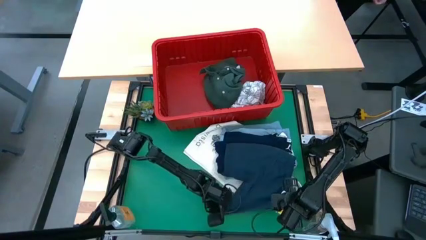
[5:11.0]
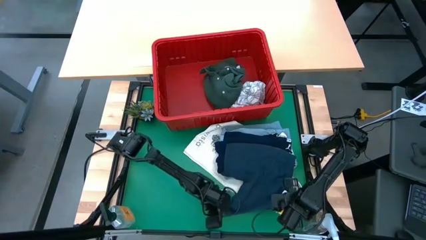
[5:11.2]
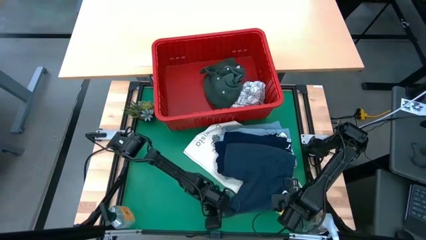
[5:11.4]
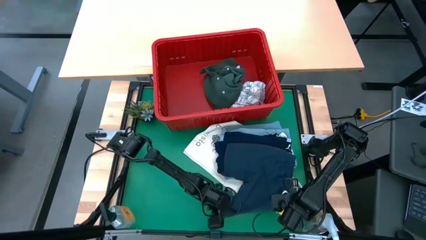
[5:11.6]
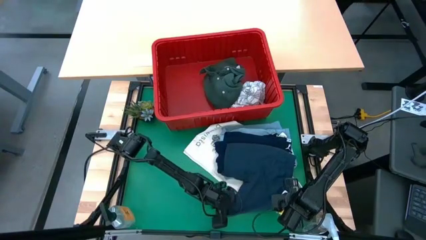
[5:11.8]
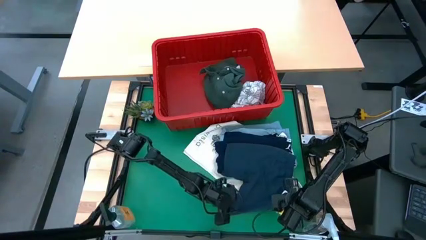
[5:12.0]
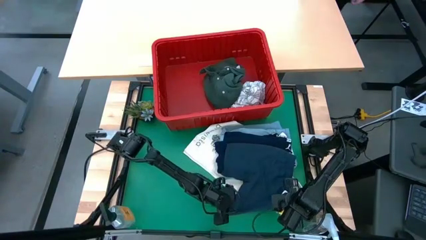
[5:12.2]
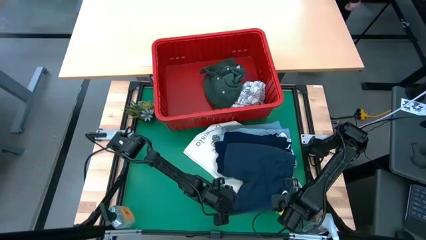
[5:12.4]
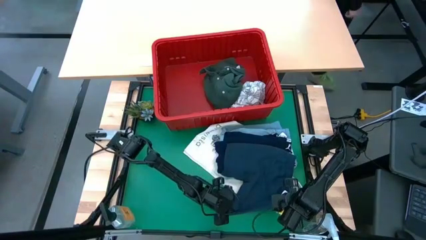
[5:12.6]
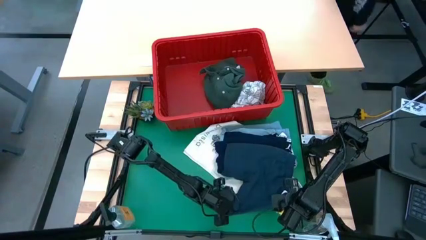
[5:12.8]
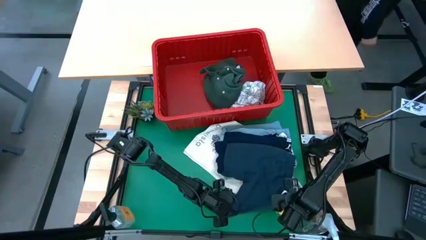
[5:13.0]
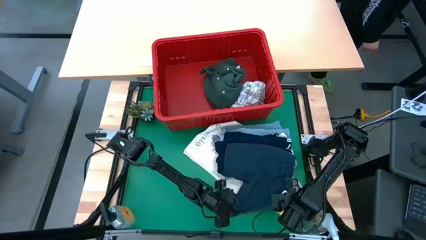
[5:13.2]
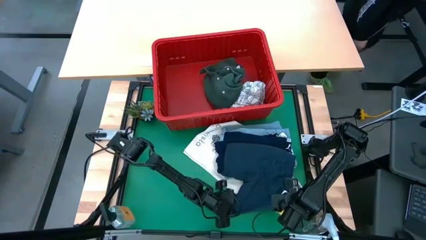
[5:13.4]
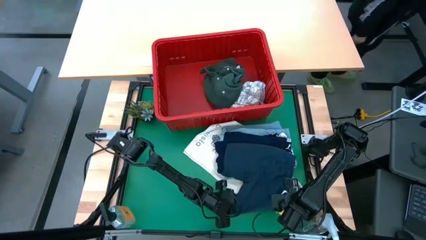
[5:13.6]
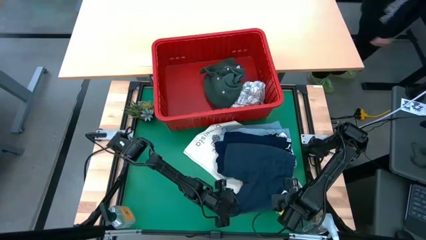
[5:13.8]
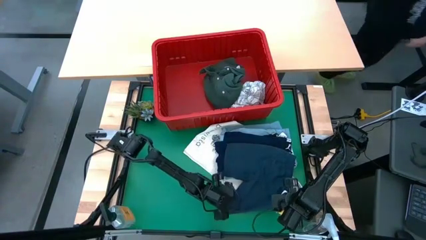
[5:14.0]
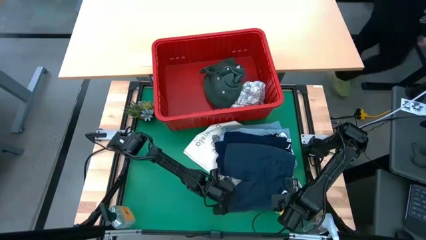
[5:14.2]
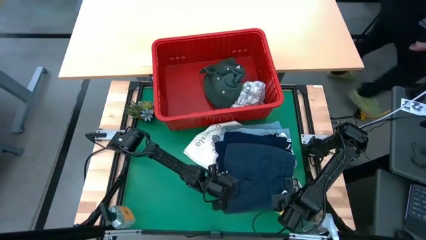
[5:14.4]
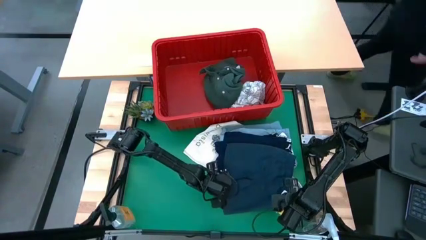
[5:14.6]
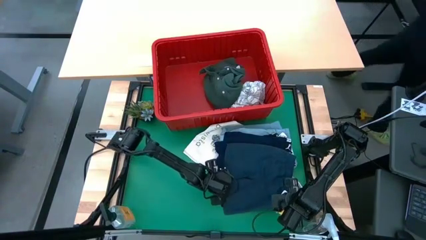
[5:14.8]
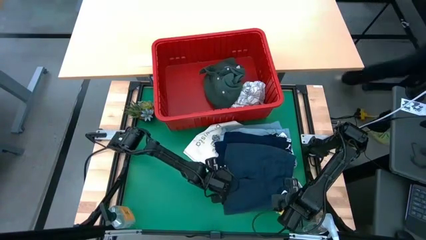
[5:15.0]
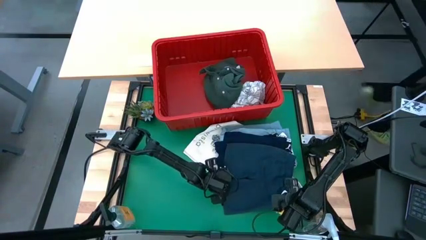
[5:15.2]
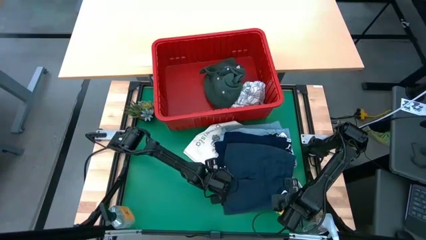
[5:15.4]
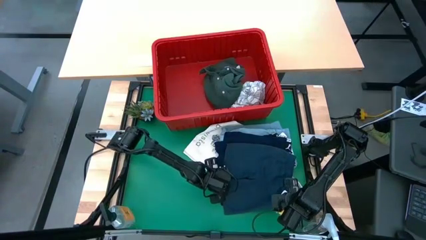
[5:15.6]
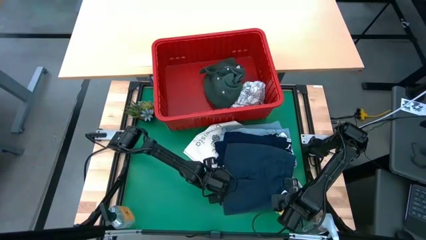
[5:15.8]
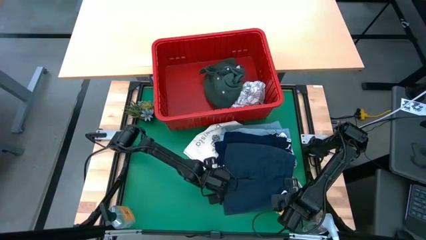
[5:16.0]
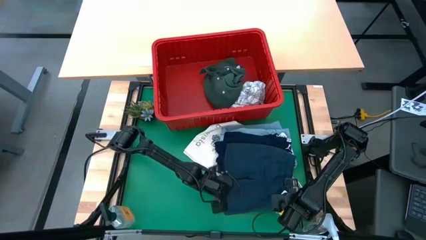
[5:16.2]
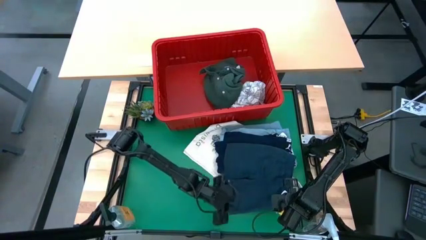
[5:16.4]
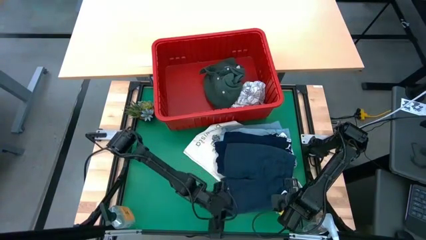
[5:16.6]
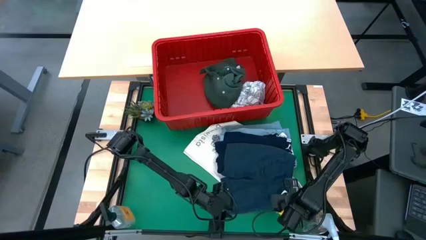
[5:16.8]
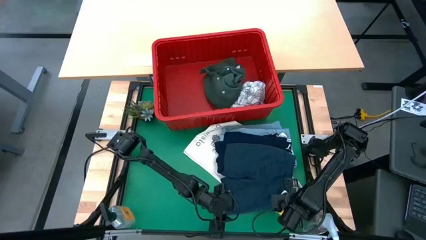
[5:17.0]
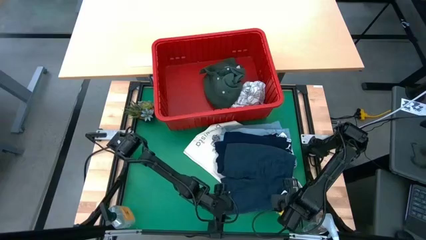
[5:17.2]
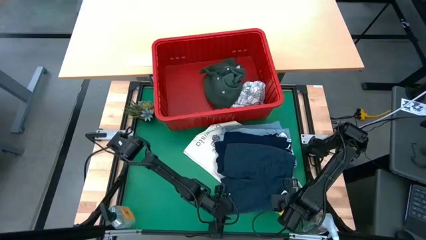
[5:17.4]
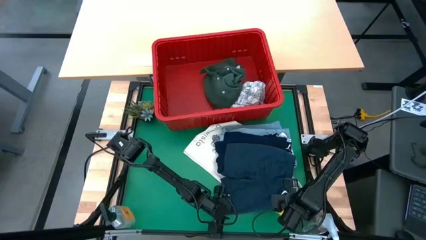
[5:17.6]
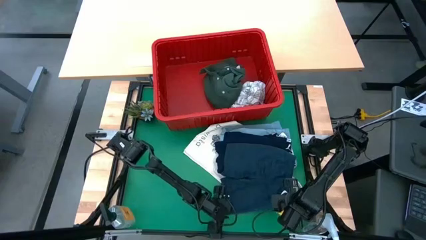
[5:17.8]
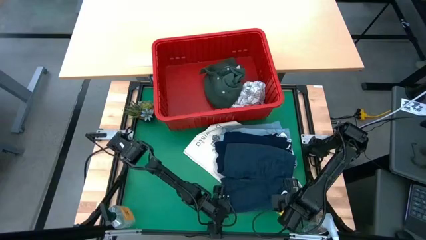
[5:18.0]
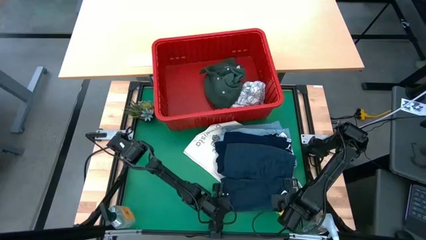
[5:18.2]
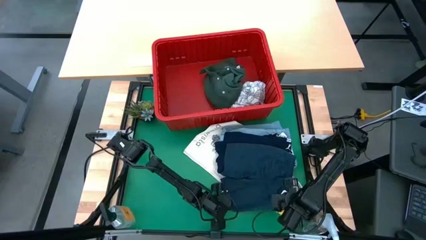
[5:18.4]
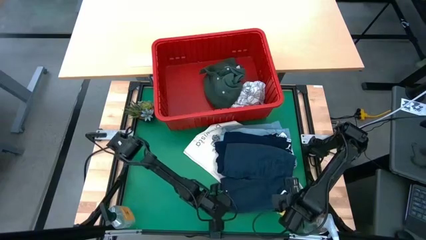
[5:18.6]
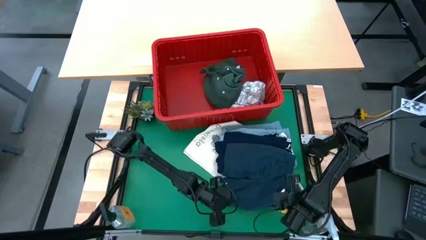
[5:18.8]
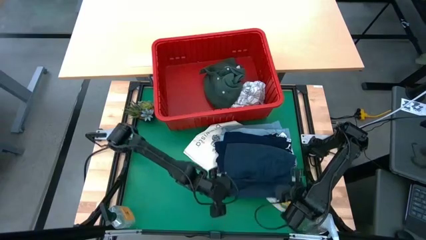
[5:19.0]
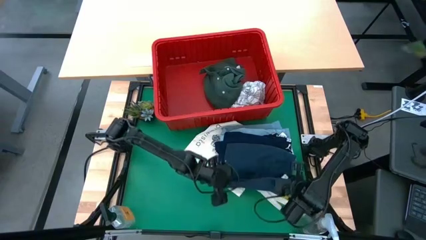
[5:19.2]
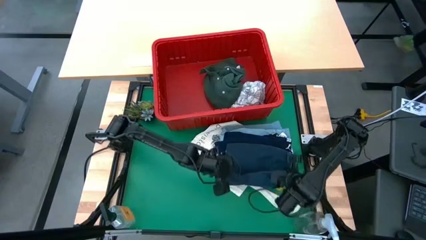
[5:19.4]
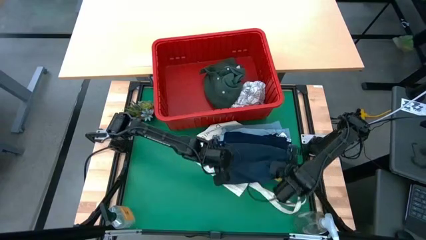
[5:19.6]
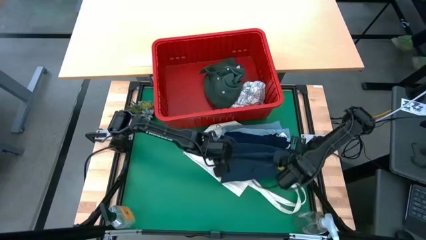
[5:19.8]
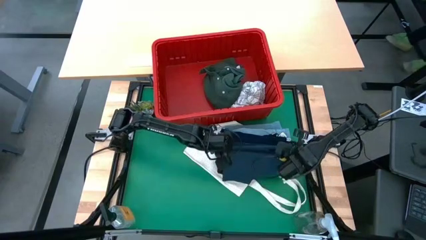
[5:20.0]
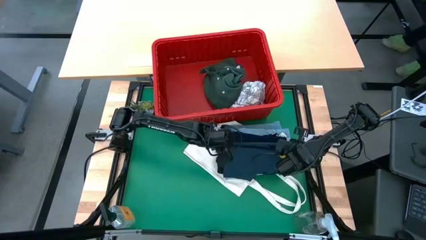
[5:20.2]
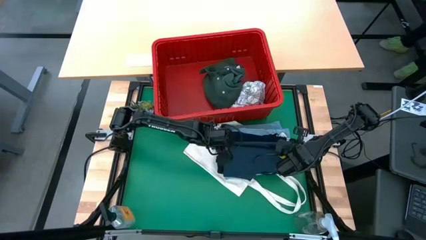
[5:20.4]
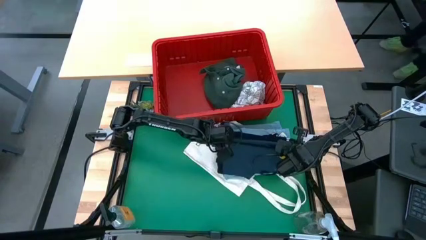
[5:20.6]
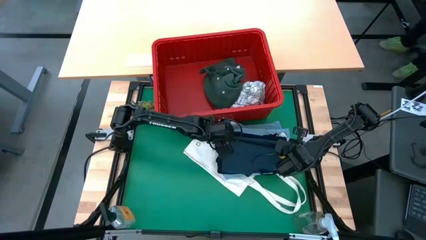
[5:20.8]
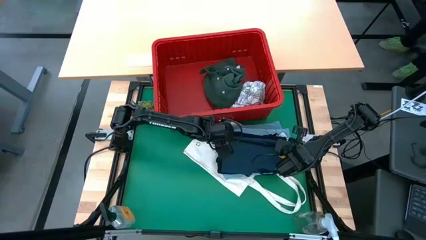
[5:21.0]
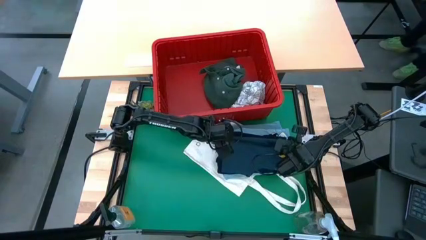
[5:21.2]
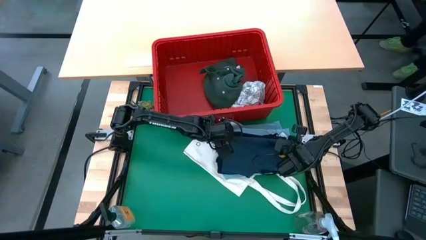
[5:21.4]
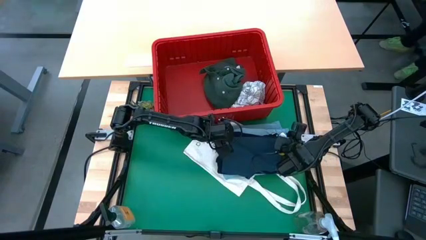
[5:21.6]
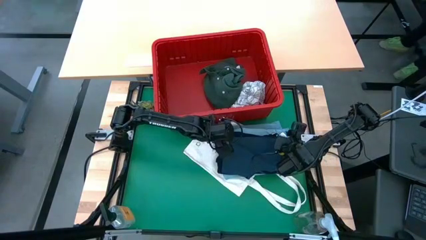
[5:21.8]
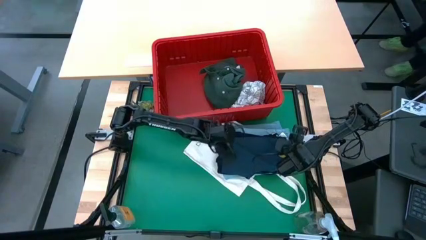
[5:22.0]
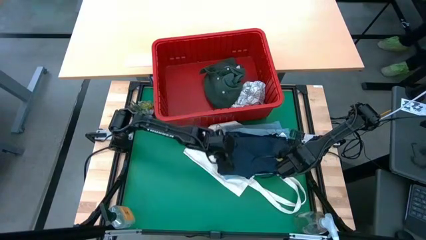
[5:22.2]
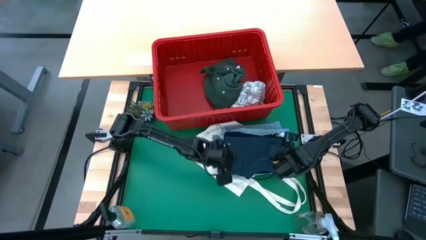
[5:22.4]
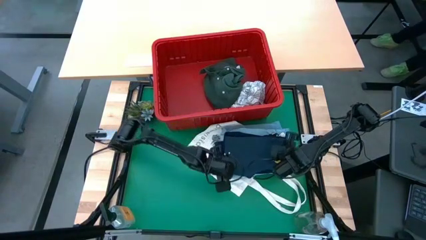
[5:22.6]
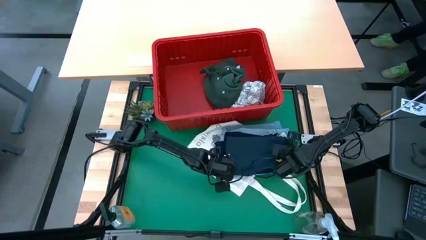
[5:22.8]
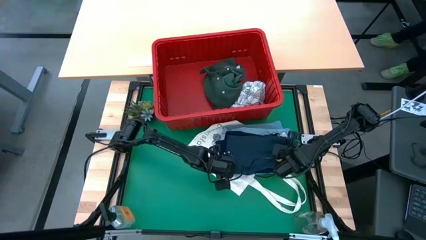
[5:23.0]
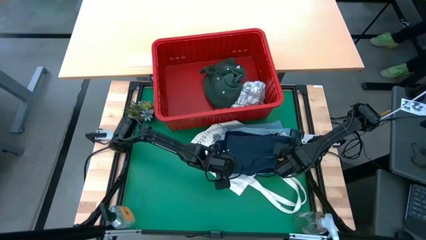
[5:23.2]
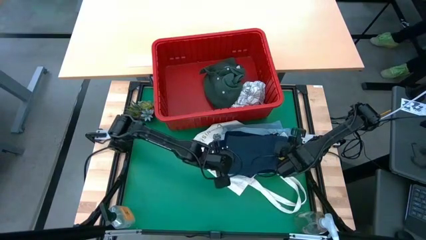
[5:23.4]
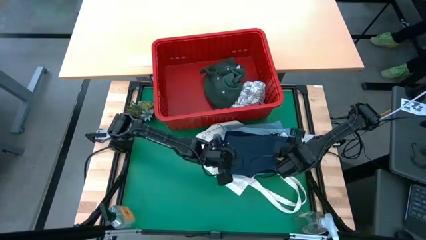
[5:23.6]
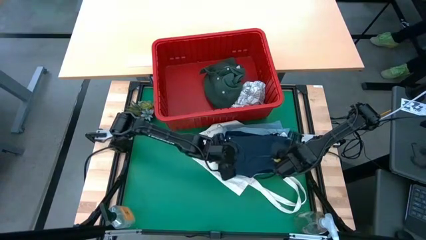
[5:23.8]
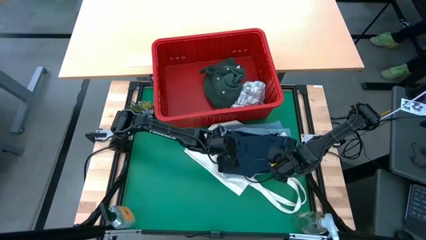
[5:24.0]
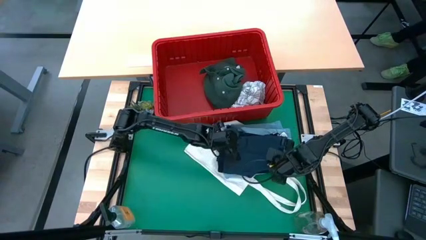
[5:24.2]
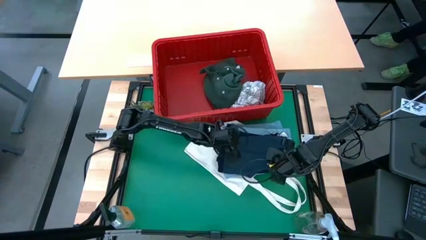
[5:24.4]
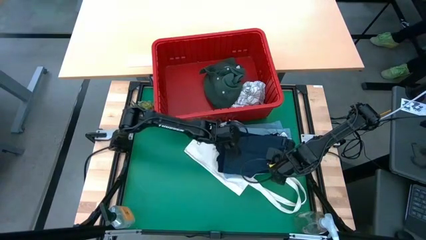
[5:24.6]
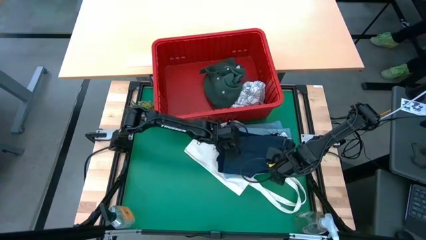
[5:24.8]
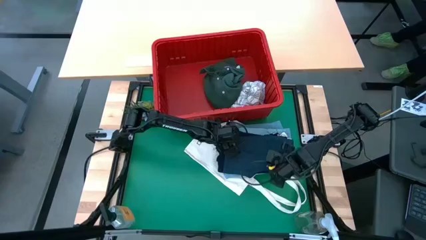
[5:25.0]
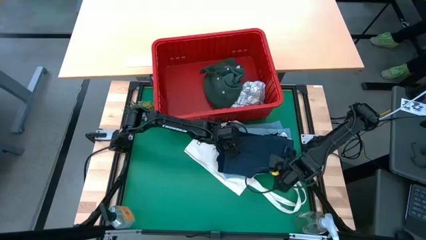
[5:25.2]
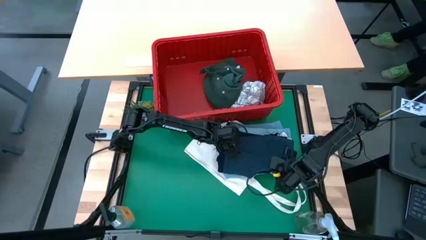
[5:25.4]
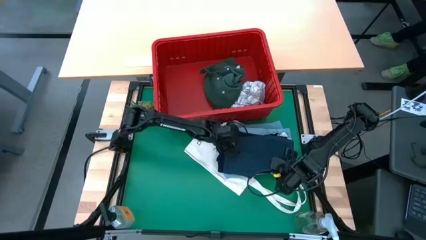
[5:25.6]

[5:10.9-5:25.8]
Task: Fold laundry
Fold the gray shorts

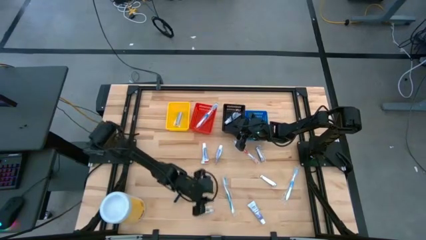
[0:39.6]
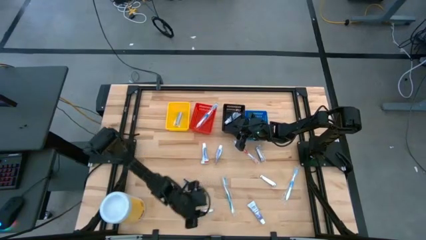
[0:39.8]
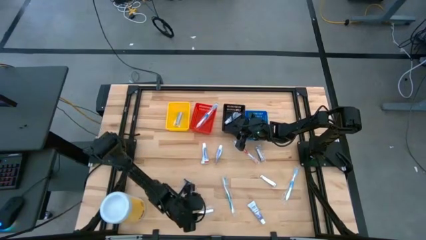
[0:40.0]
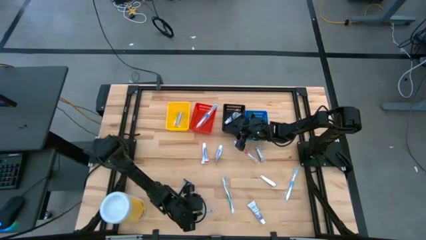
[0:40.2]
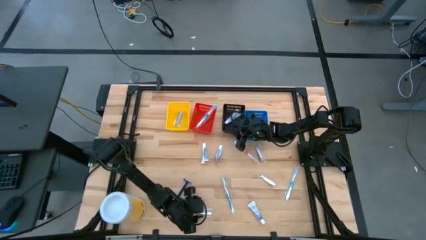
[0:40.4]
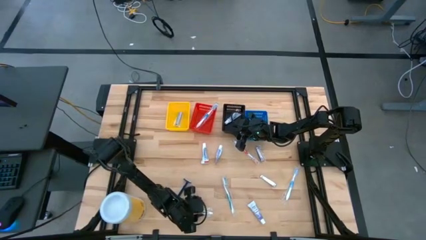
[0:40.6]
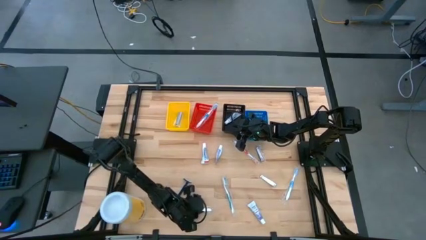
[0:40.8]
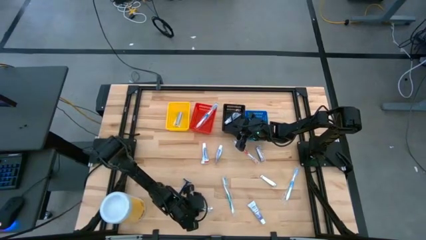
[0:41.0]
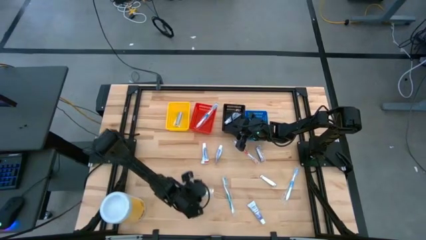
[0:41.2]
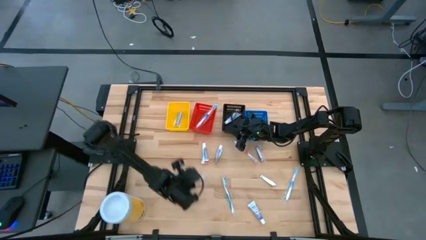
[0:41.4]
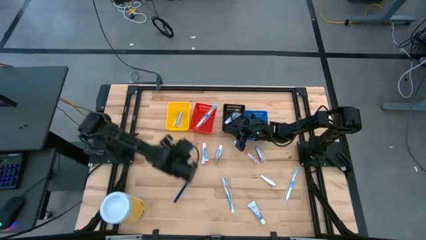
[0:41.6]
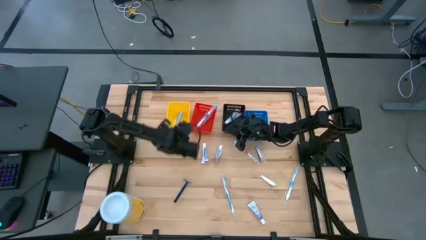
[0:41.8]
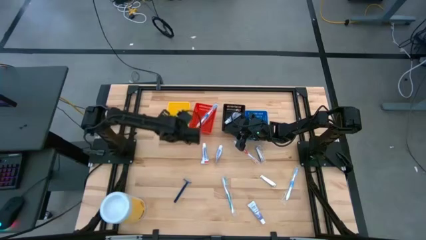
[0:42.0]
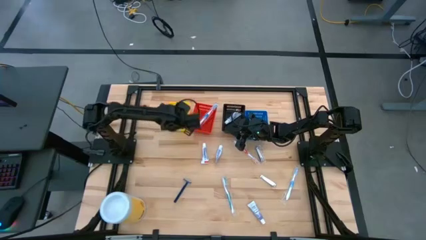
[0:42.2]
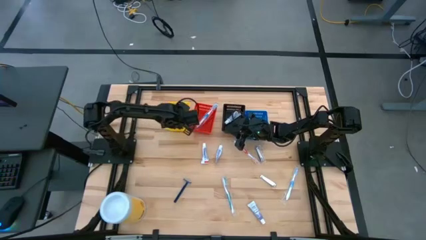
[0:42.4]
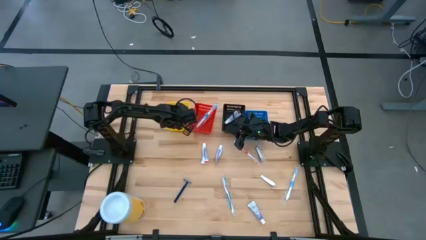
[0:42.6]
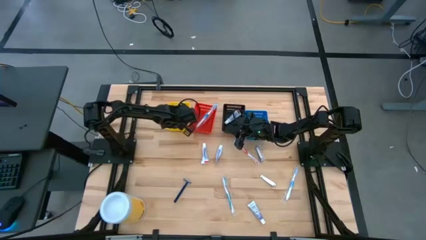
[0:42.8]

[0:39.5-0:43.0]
Task: Pick & Place Travel size toiletries
Put the silver nail cutter into the yellow bin
